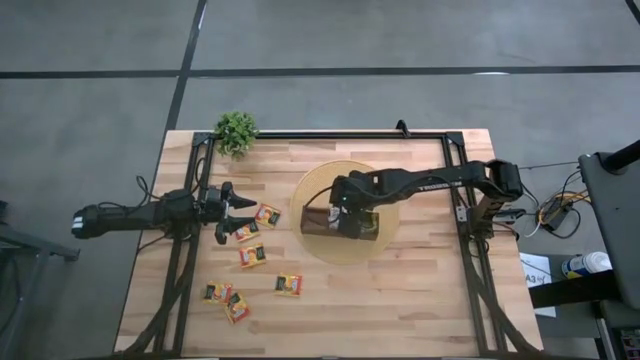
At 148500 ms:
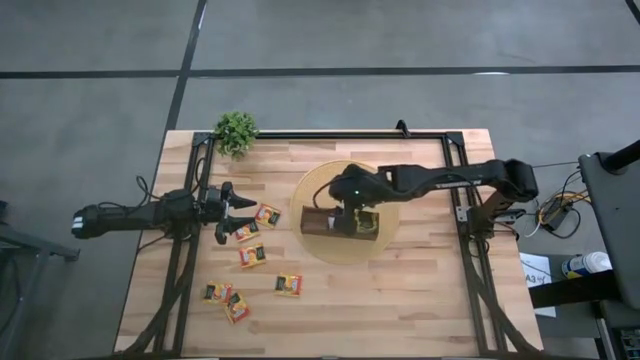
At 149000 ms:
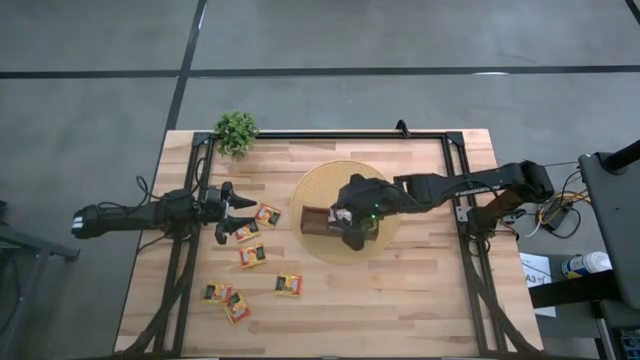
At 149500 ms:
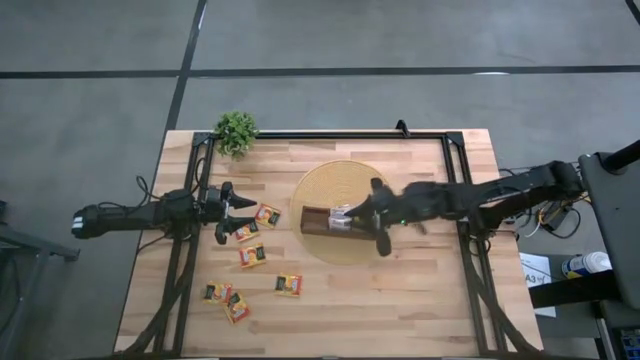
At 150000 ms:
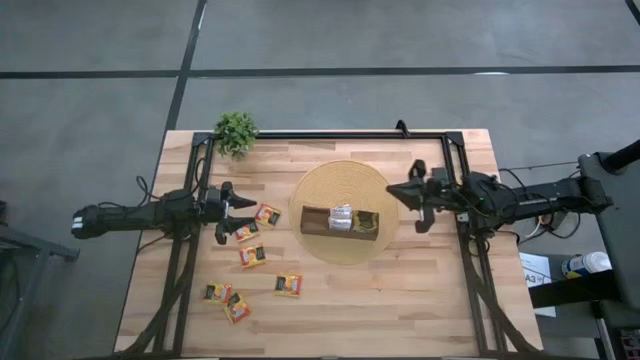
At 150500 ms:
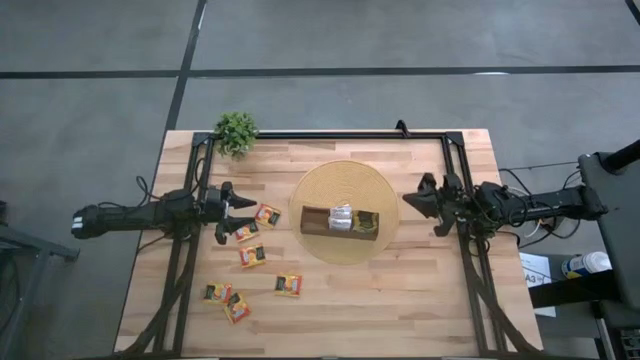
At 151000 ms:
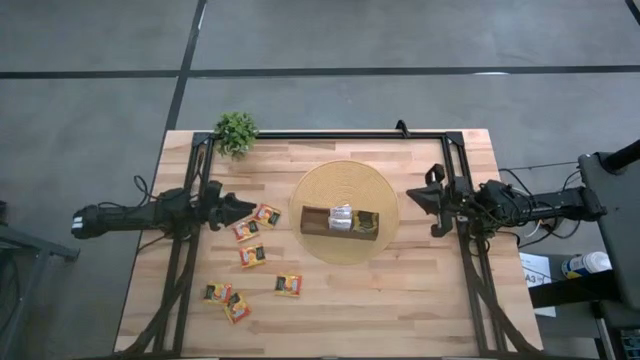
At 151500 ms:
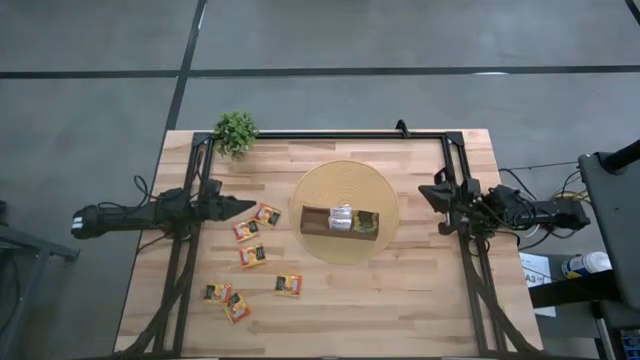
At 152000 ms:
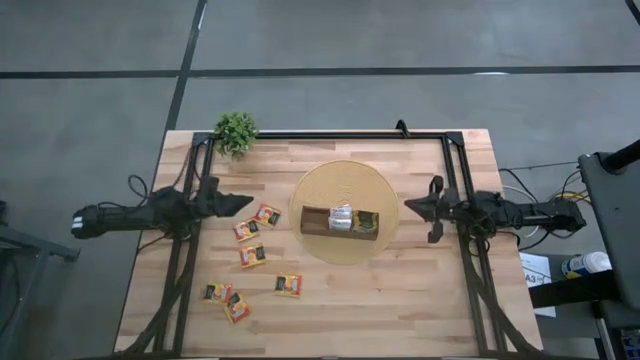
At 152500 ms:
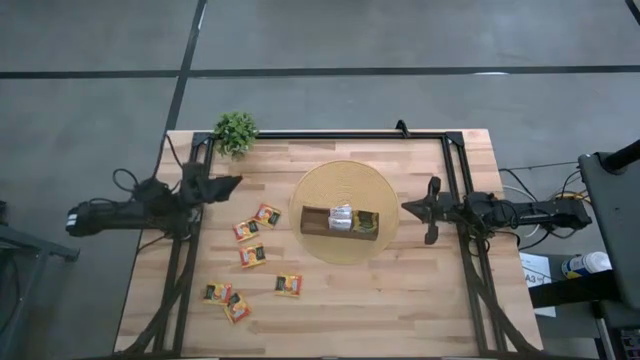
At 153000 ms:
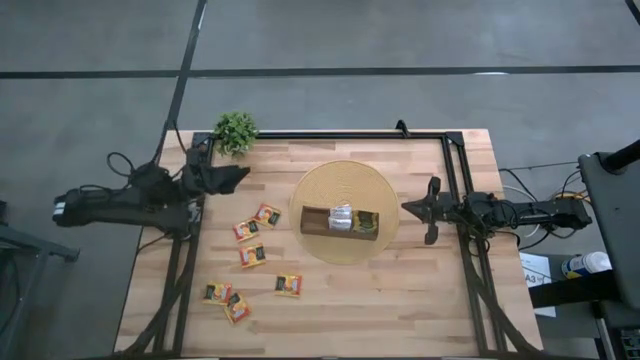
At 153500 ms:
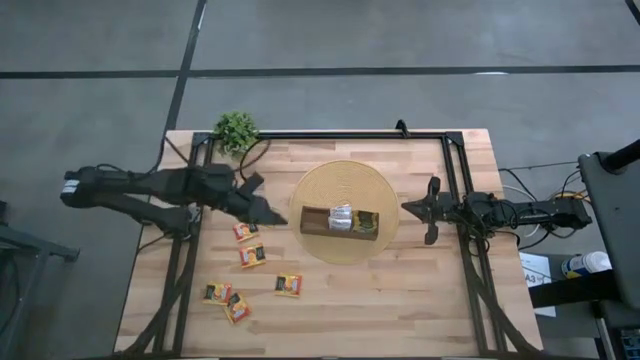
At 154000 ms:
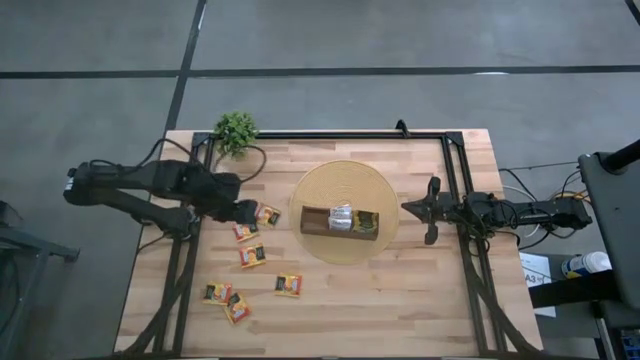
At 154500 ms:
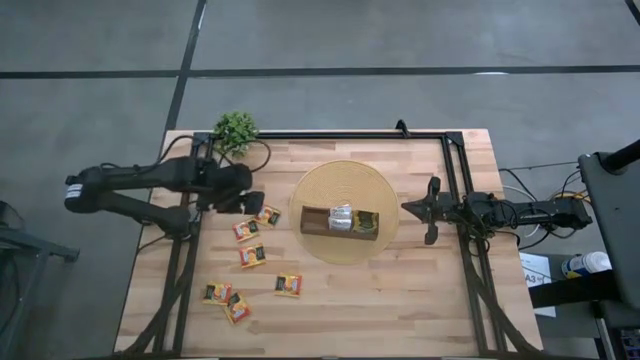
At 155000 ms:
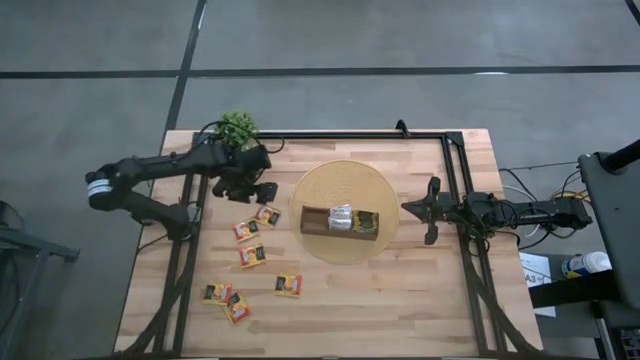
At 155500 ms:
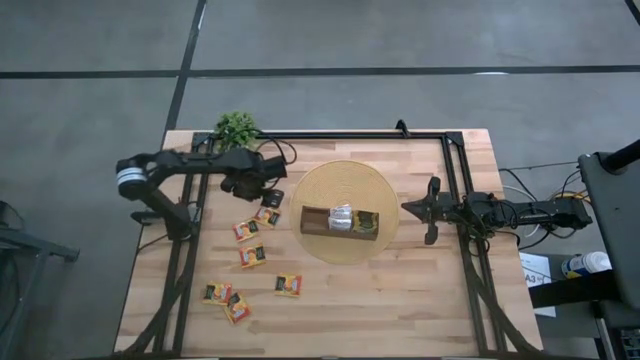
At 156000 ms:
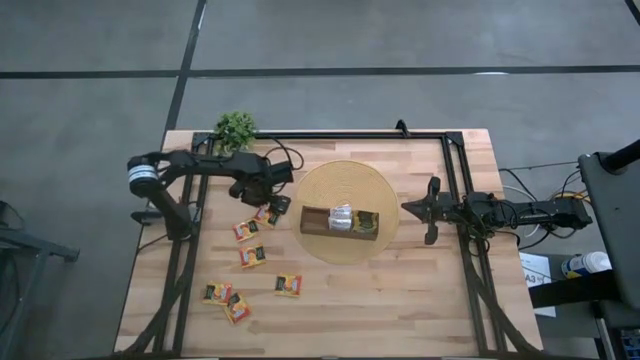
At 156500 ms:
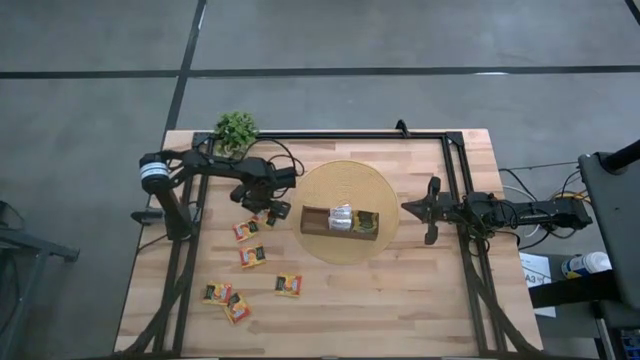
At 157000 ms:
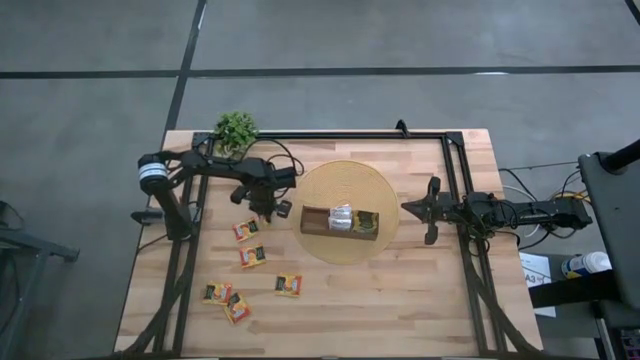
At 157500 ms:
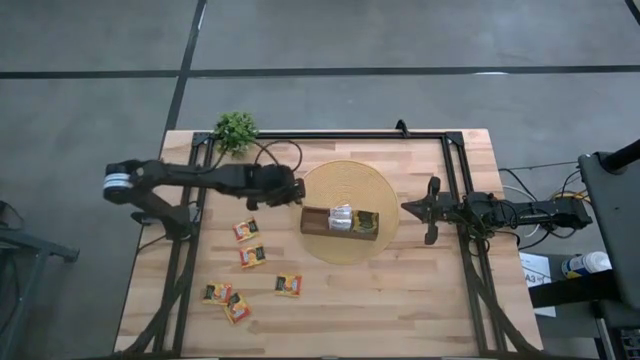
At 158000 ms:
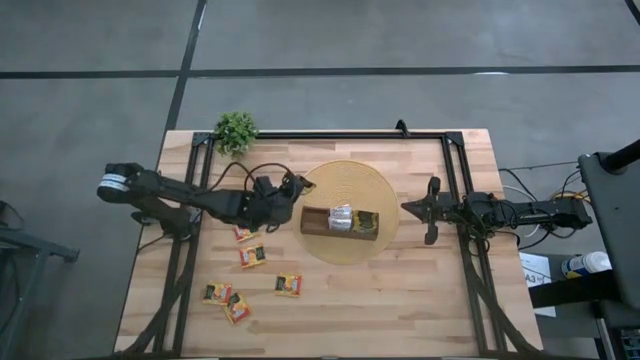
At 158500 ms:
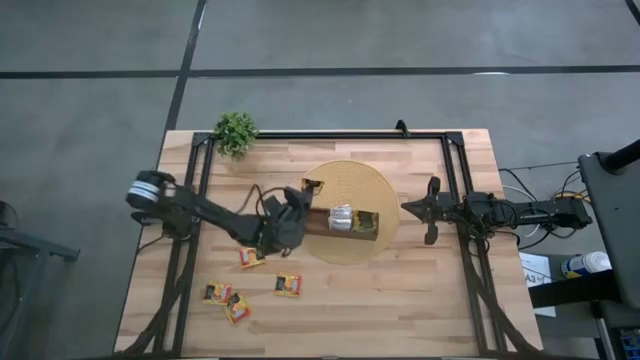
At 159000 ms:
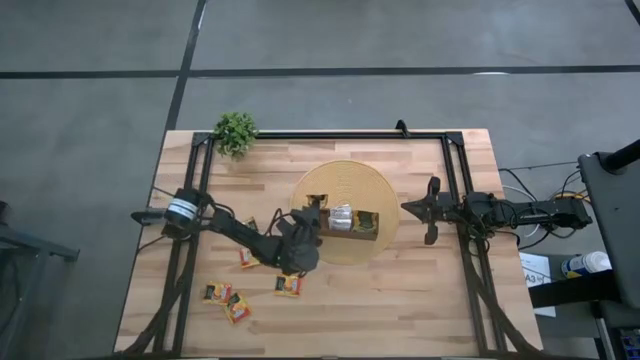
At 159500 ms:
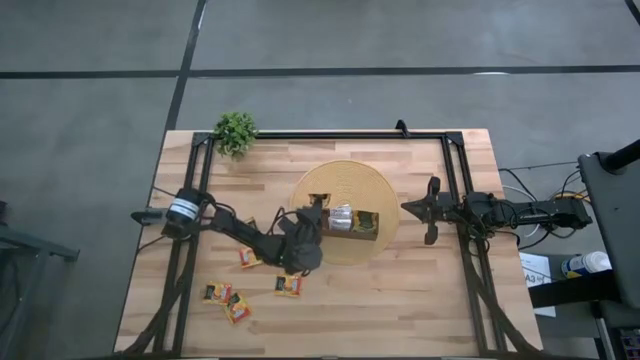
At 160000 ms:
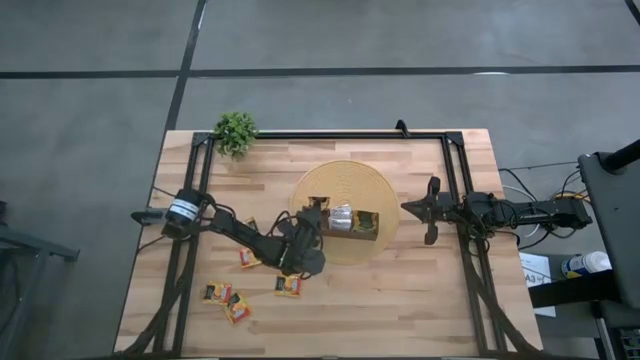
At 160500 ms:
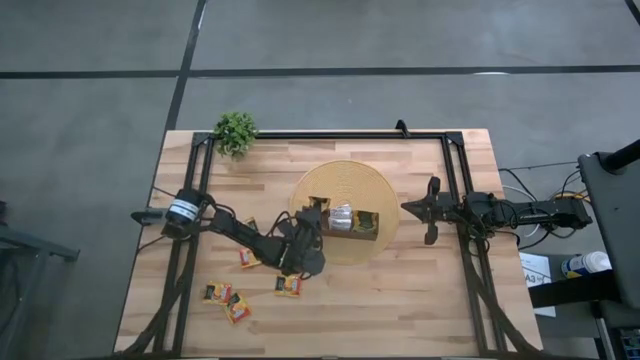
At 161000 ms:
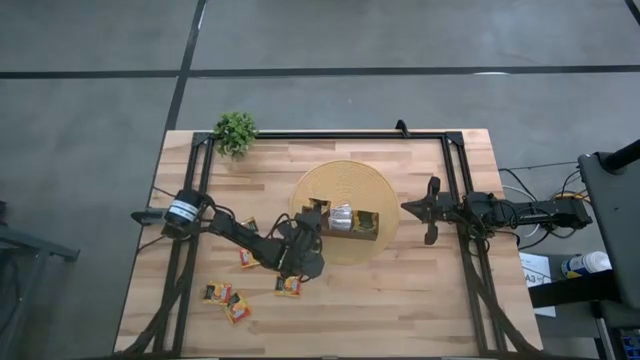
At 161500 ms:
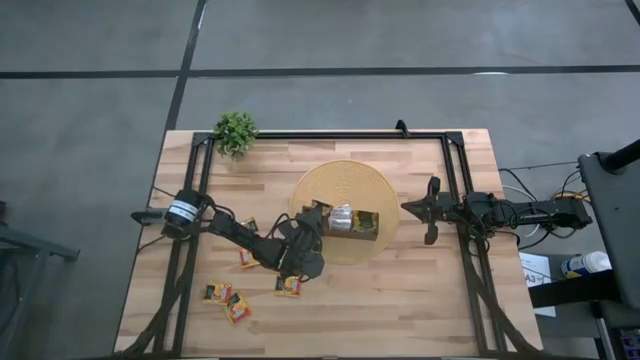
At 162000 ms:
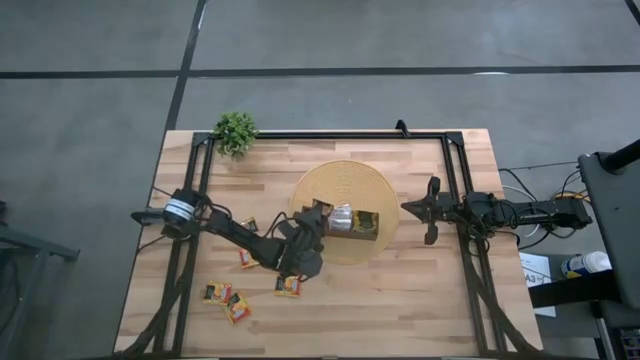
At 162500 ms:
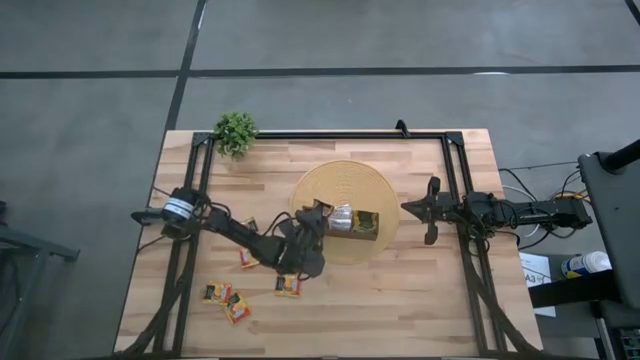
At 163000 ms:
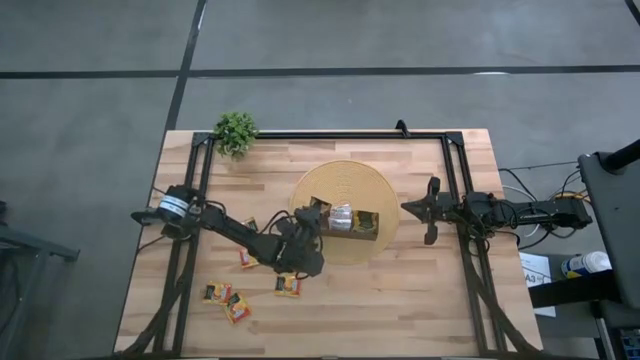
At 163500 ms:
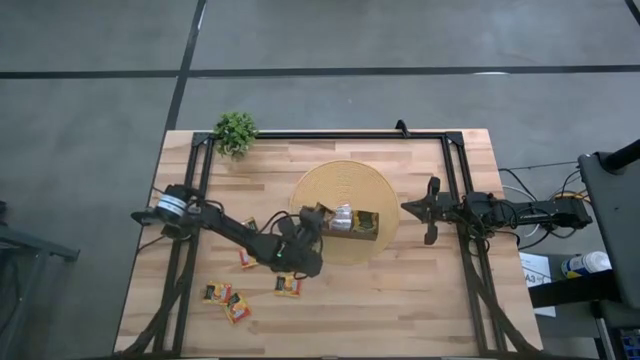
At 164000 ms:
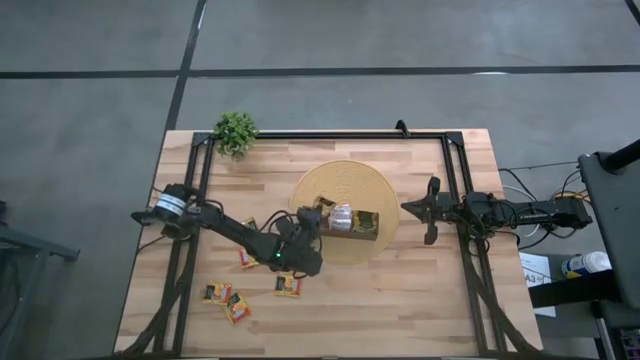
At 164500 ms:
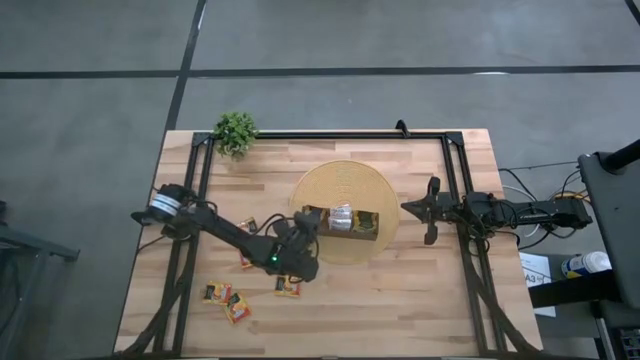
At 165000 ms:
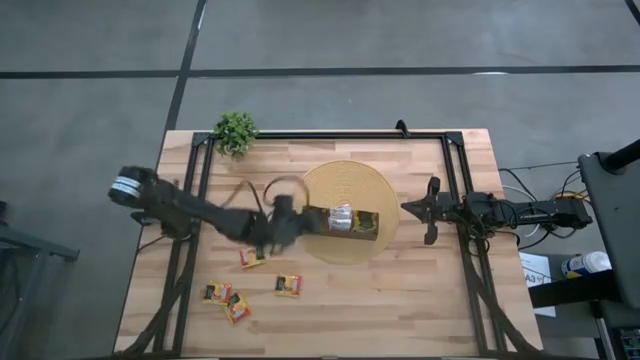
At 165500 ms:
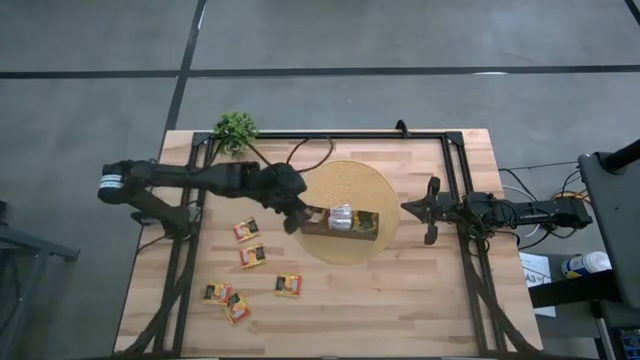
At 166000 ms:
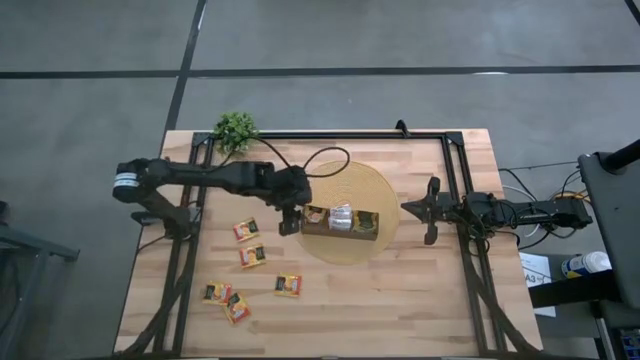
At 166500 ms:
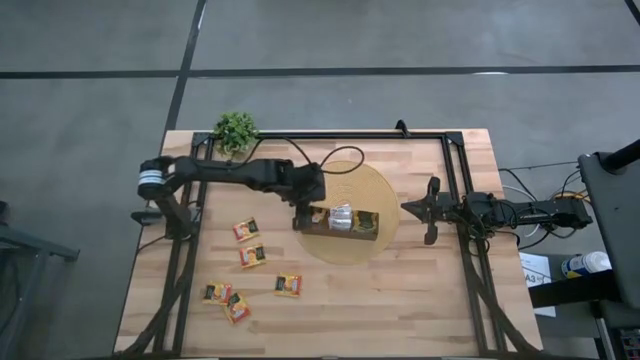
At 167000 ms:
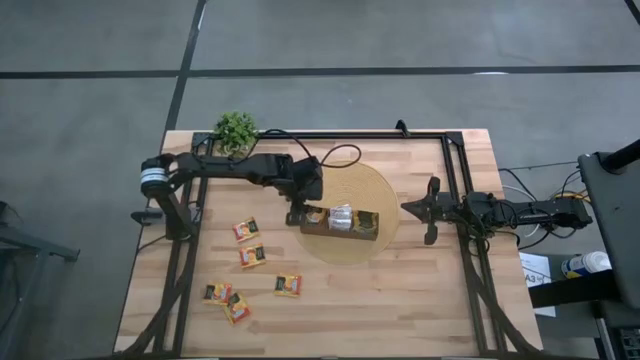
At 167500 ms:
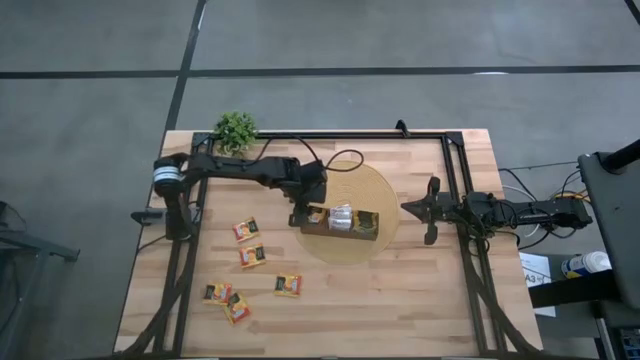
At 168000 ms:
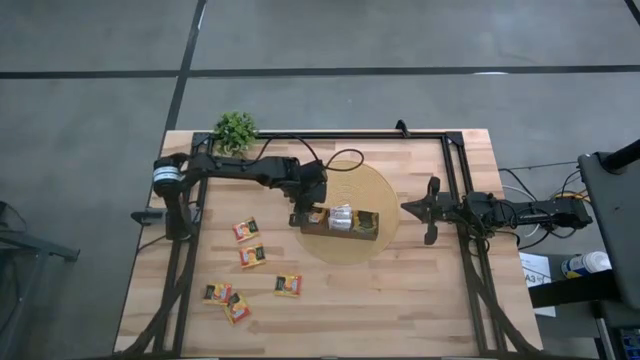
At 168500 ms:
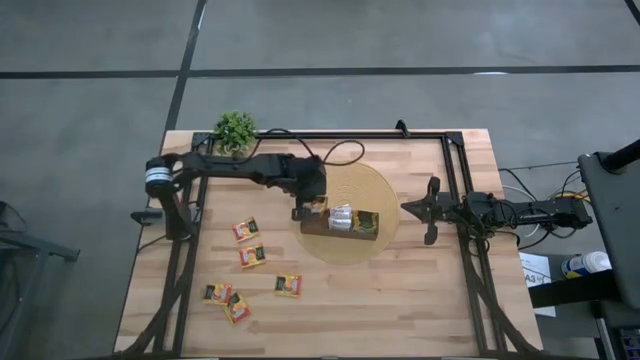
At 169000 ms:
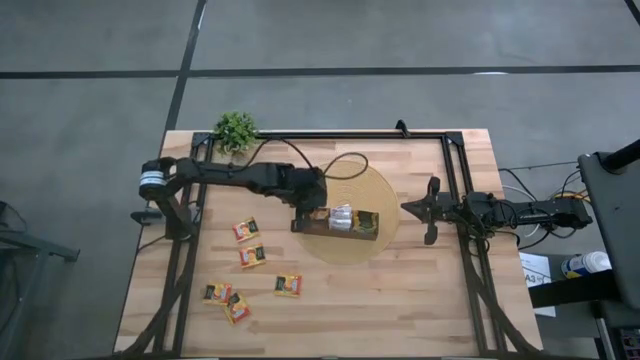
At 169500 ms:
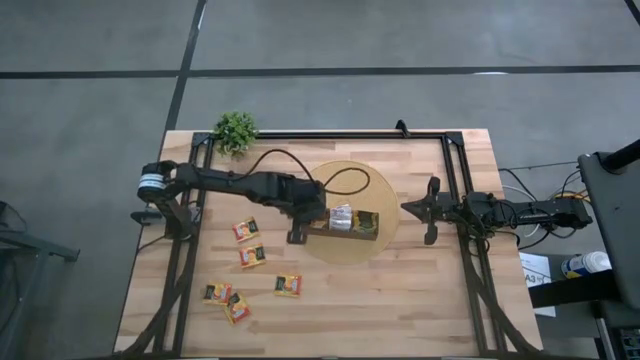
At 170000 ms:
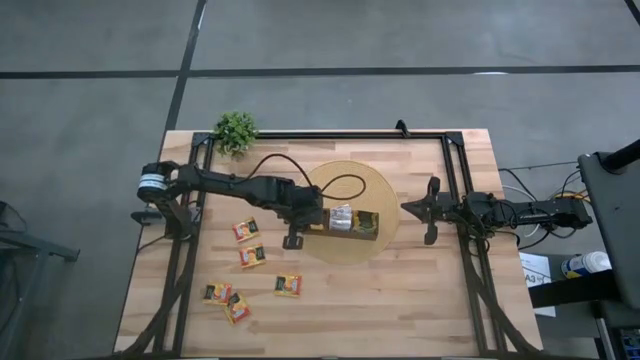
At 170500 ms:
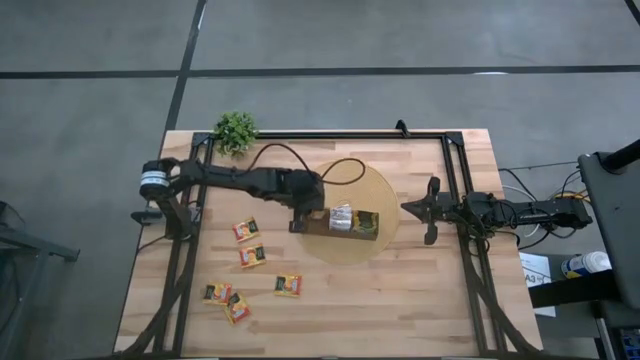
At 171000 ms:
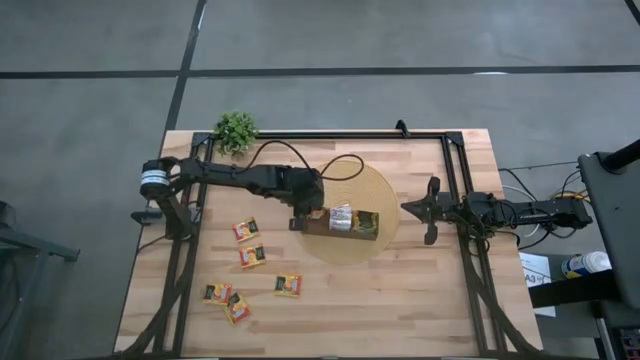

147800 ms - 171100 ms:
Task: Pick & Place Tea
Put the orange tea bag into the left section of the wooden organizer
